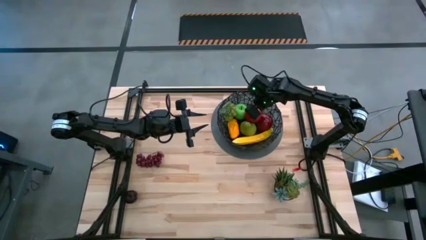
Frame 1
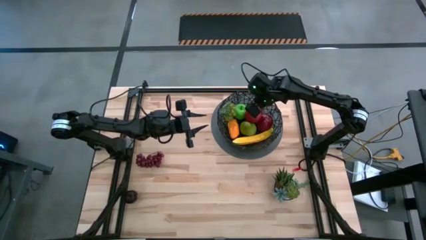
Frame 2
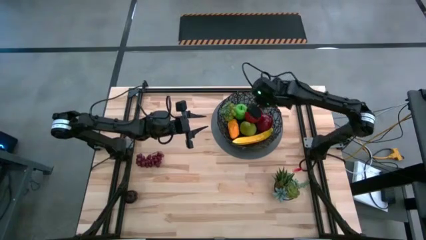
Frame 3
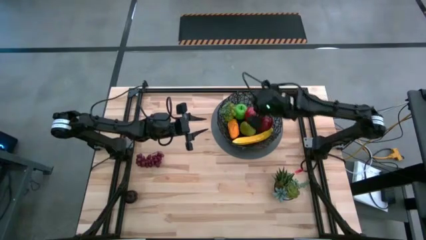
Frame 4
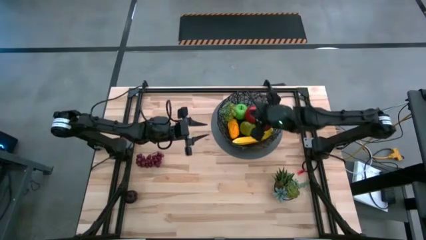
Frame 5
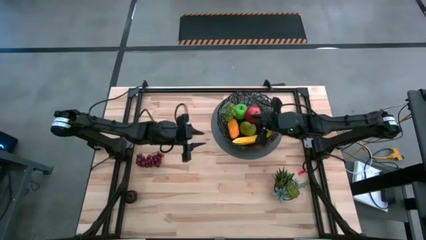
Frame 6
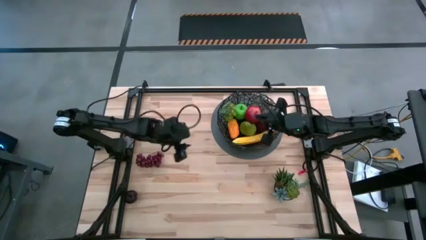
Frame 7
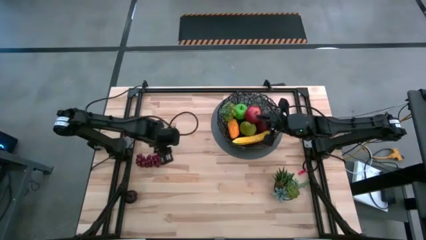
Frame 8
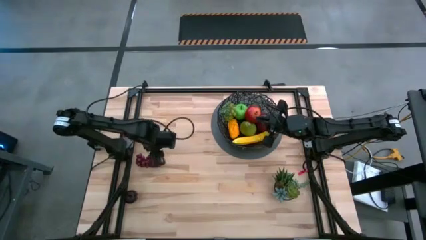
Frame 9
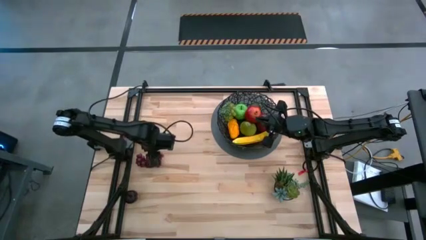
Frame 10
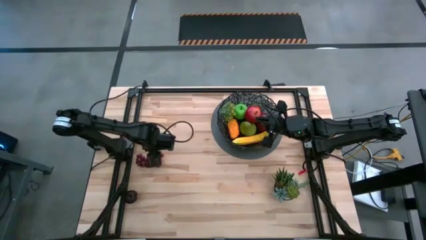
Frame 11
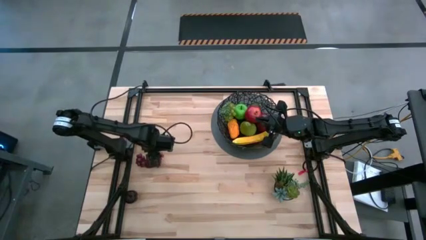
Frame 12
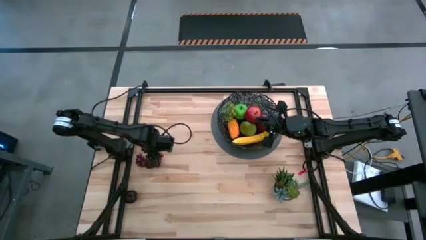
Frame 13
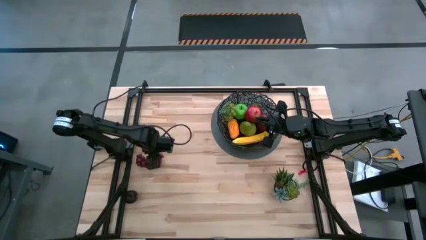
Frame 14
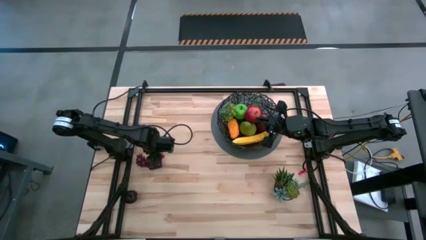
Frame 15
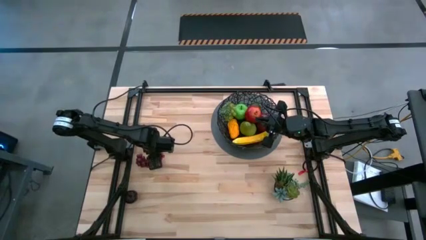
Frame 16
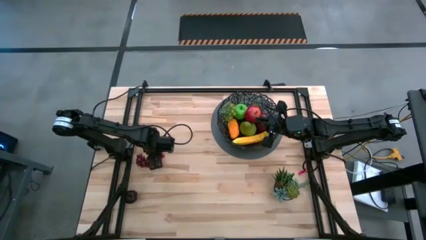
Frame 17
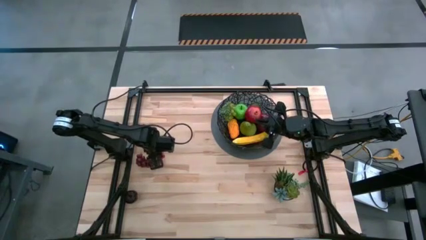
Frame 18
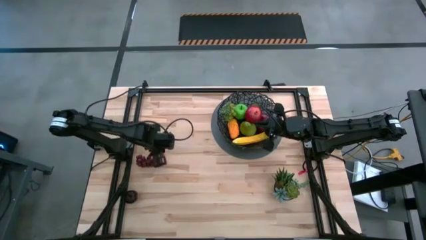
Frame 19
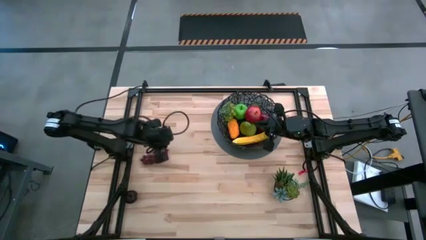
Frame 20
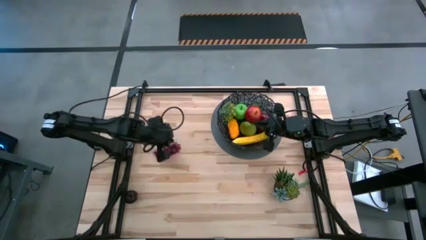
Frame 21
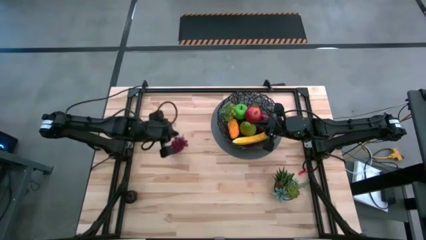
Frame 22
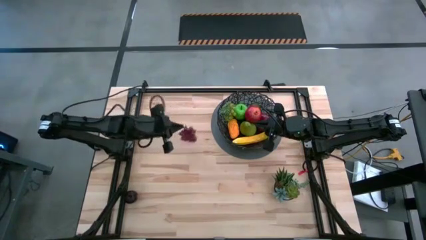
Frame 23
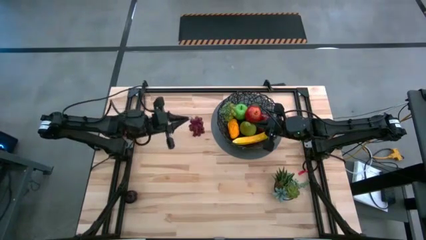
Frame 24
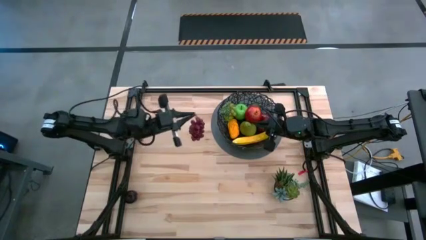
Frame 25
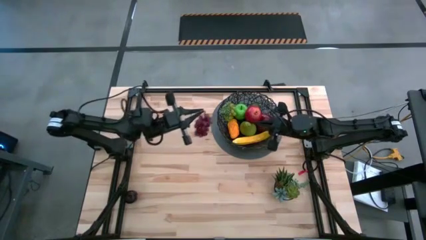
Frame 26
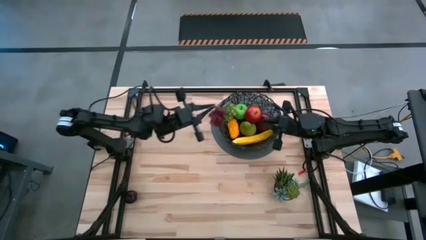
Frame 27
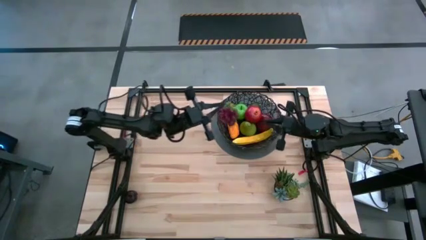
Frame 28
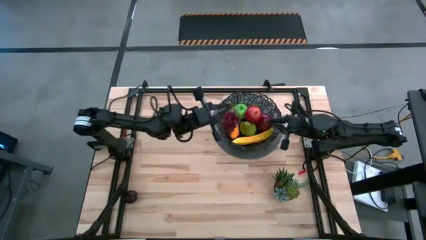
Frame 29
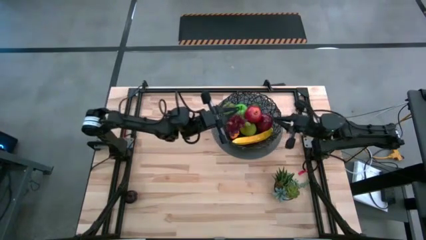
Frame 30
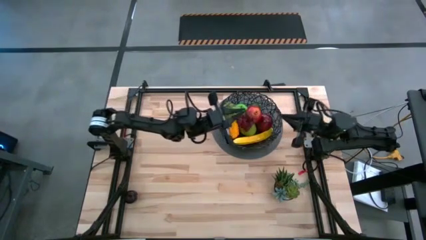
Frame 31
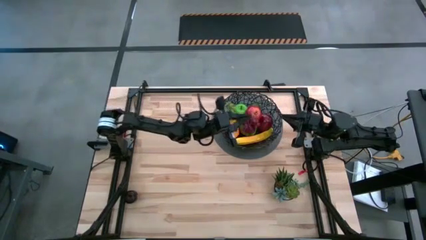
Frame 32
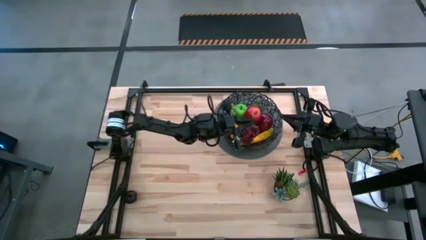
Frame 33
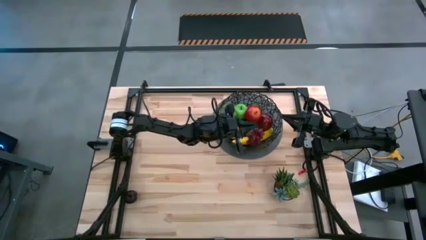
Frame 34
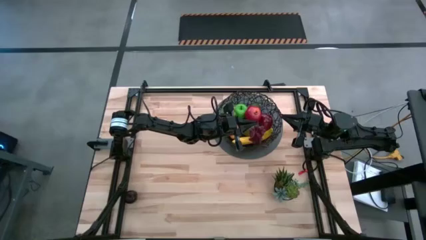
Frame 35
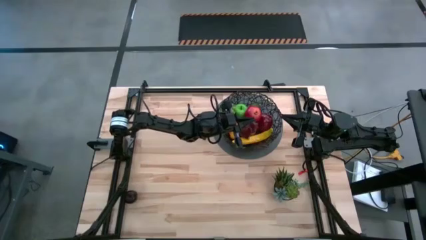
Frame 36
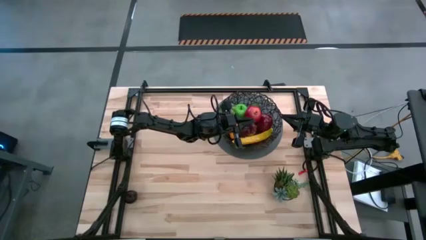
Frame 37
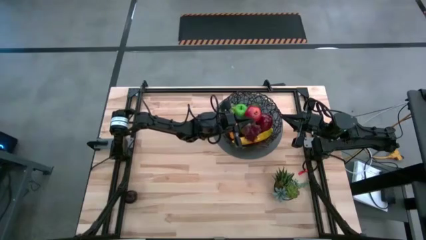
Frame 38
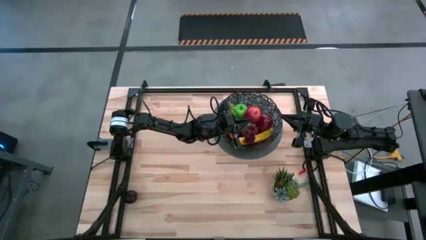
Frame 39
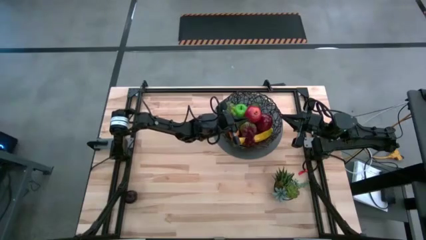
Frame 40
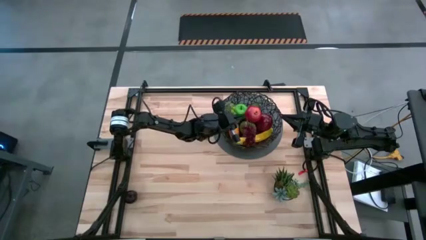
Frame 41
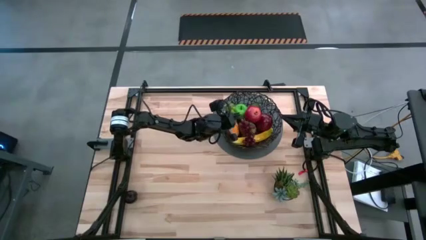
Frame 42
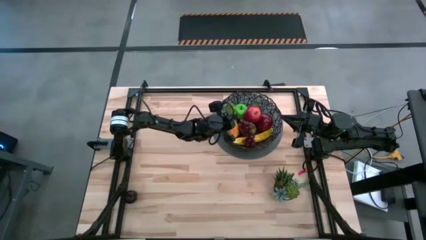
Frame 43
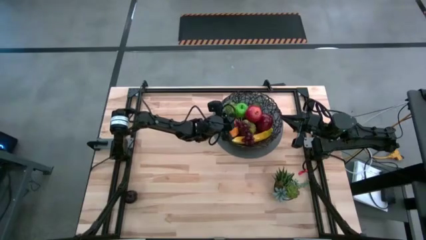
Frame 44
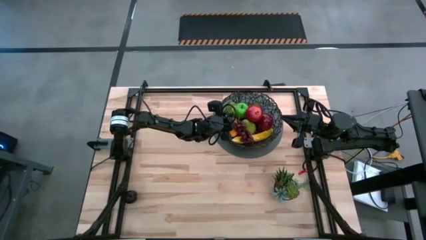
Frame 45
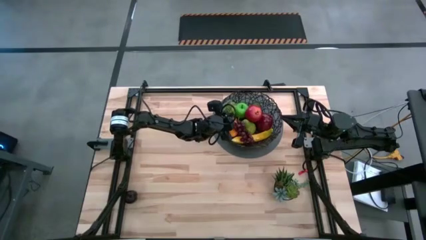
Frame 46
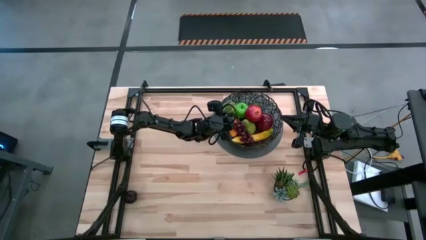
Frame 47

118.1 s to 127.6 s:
Task: Build produce basket
Put the red grapes into the wire basket

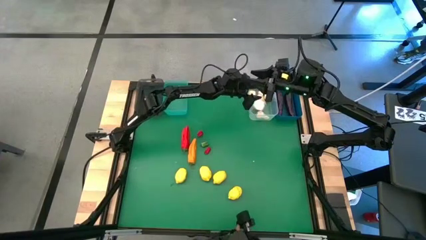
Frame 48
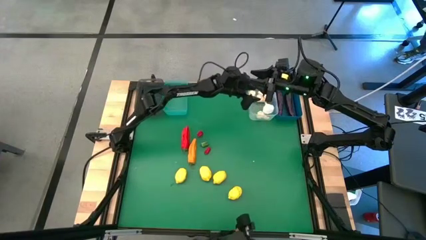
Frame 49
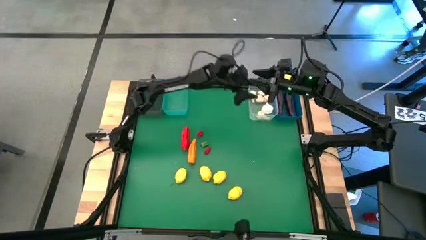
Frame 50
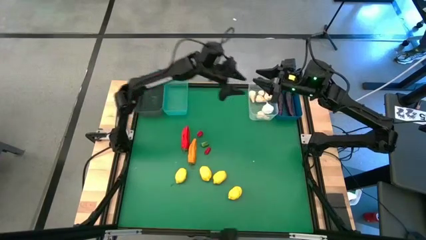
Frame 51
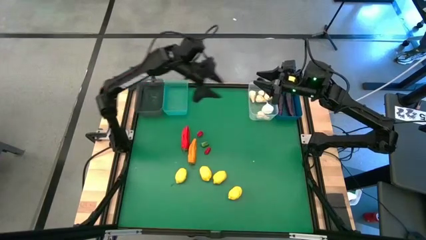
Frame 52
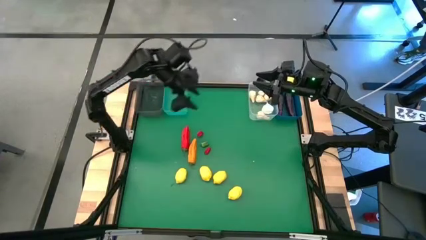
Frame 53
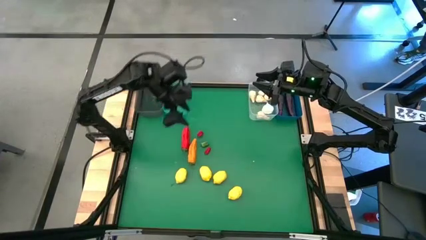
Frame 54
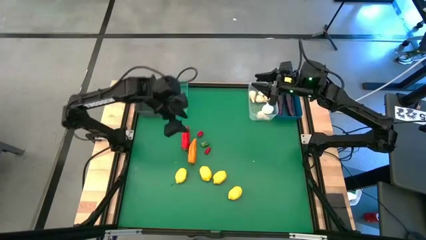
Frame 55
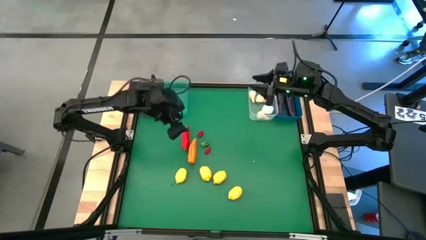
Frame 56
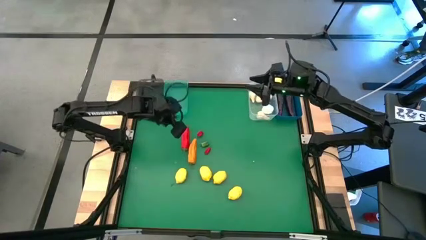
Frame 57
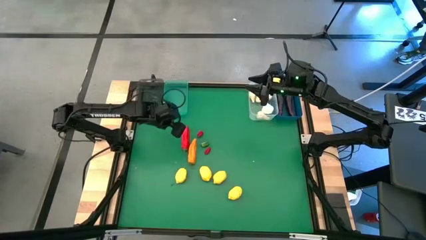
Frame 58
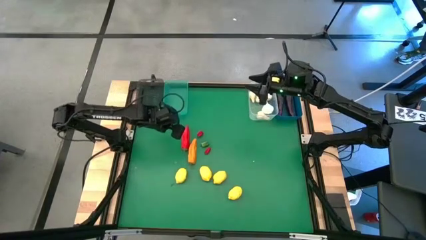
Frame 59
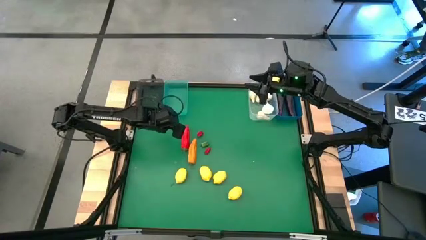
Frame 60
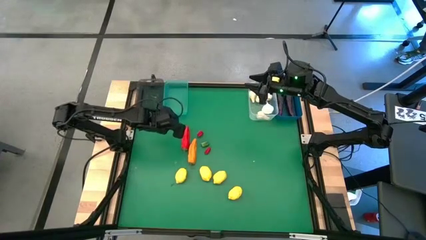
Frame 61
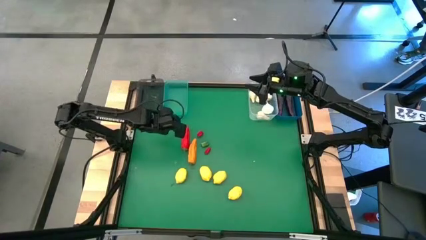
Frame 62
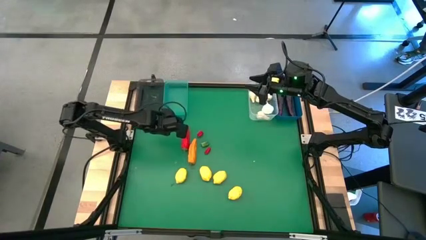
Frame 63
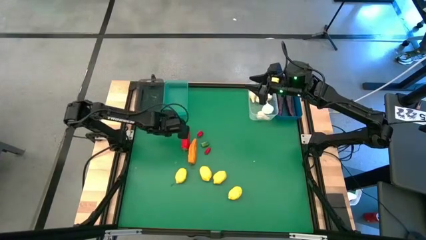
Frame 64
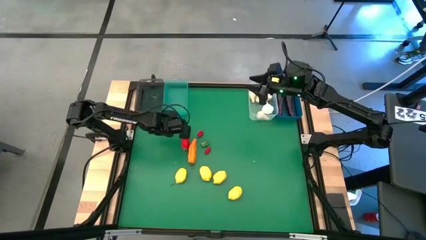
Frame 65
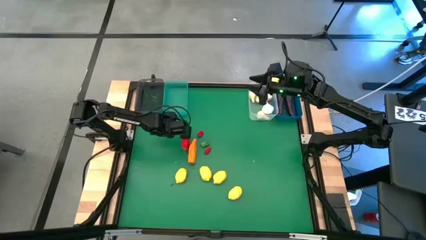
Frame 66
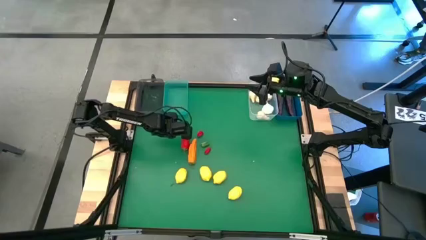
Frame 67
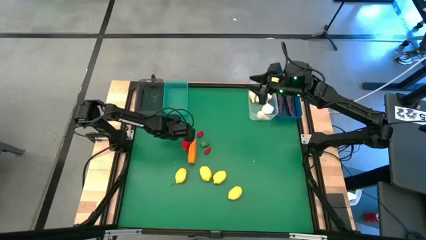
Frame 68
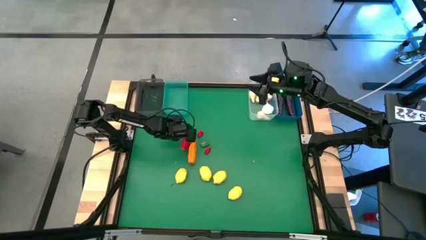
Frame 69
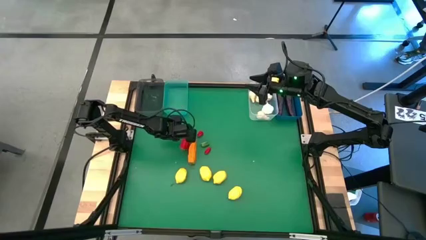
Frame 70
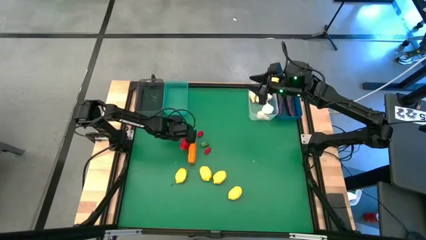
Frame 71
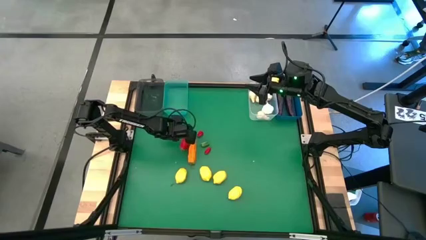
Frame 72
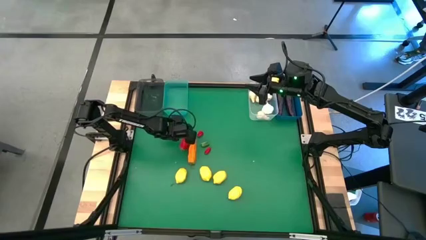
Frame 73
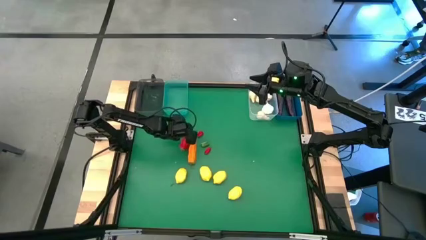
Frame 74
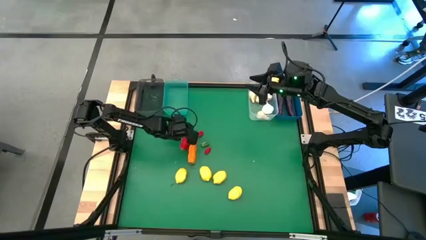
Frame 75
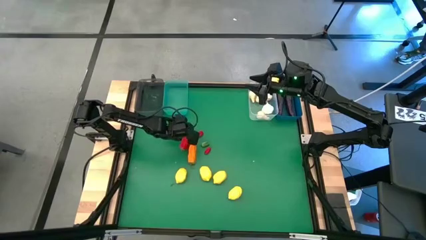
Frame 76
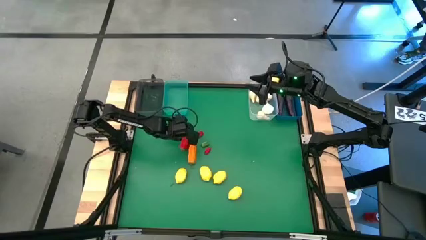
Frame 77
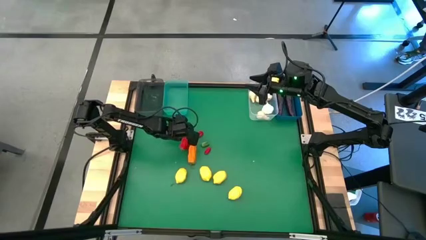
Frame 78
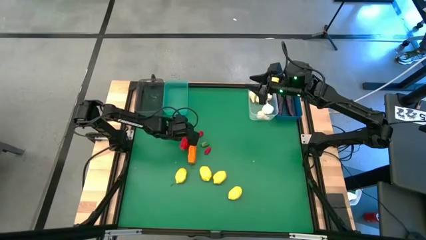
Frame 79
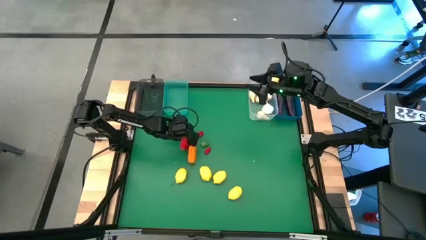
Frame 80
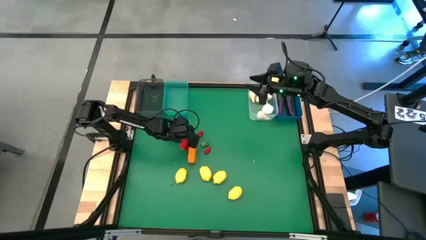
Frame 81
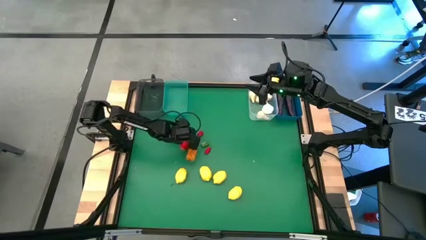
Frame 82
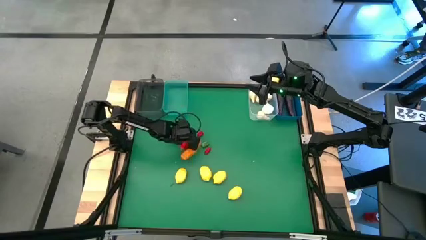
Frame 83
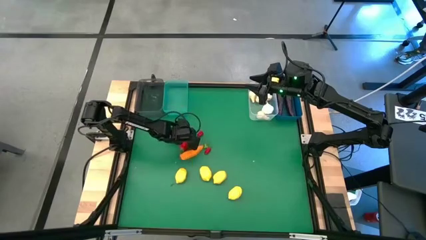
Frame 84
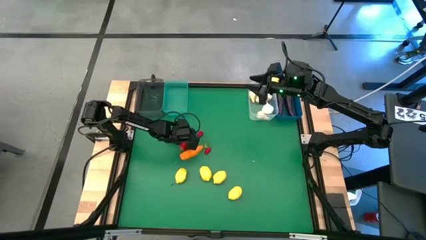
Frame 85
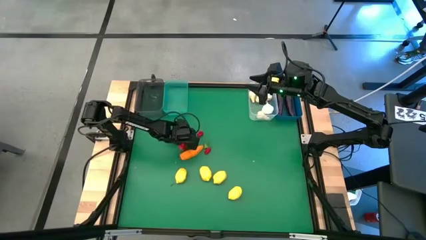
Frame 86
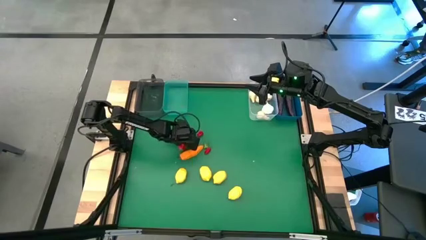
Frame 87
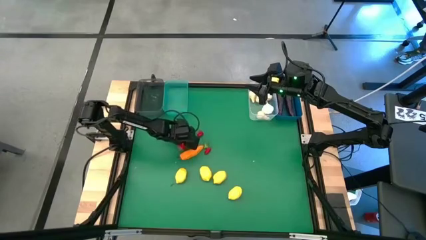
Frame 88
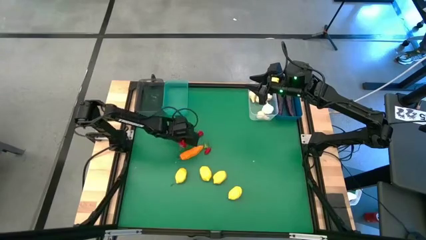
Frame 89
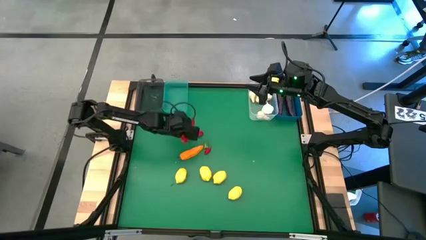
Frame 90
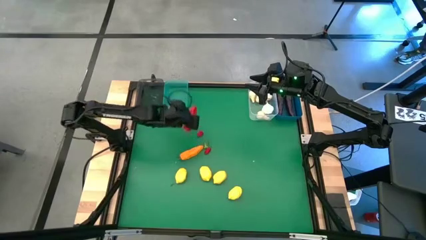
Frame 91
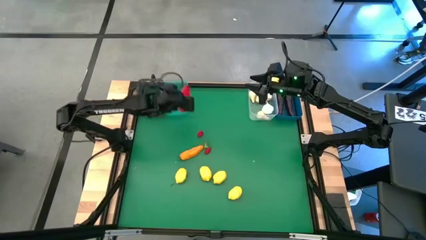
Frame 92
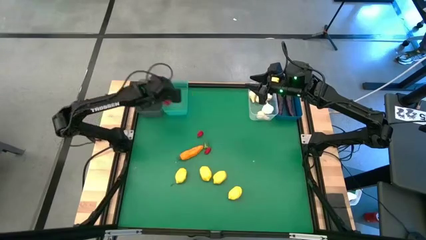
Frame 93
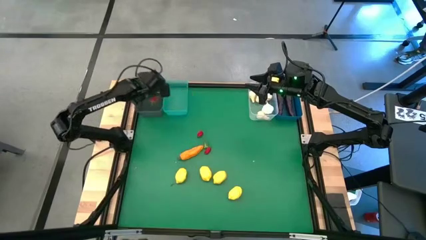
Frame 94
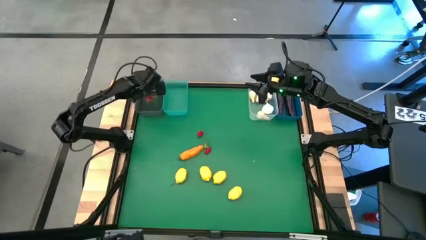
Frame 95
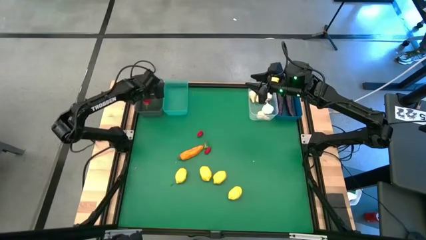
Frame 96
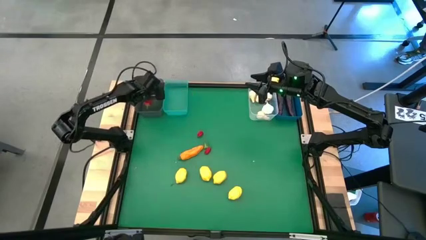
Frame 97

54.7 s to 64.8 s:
Task: Sort produce into baskets
Put the red chilli pepper into the black bin
